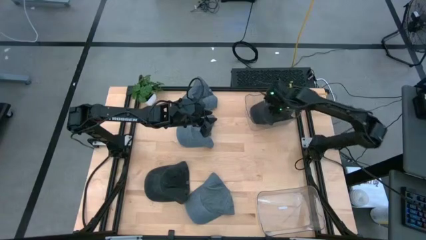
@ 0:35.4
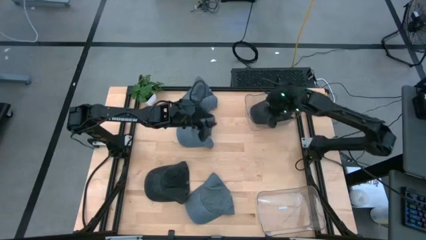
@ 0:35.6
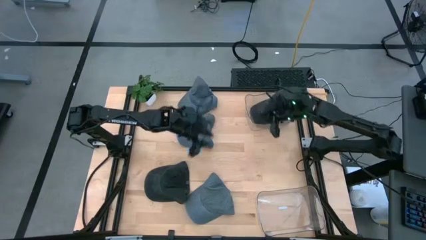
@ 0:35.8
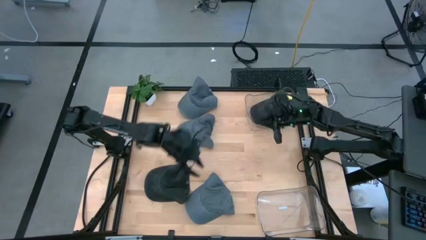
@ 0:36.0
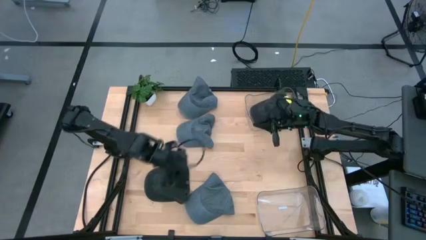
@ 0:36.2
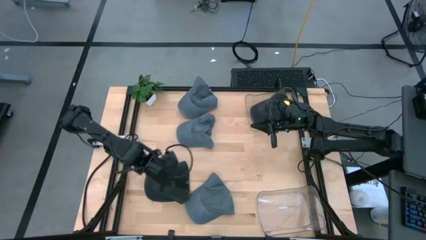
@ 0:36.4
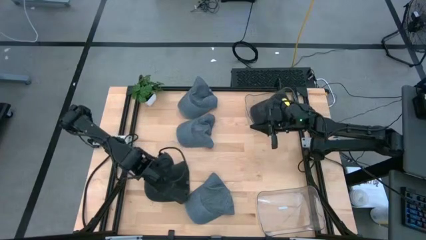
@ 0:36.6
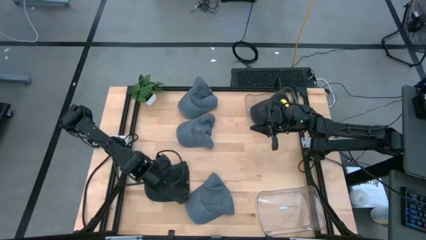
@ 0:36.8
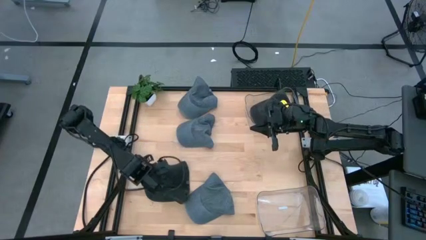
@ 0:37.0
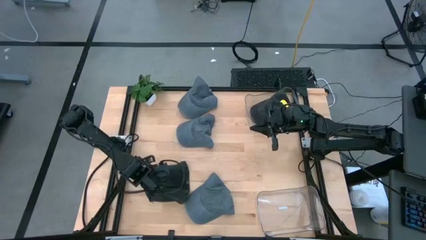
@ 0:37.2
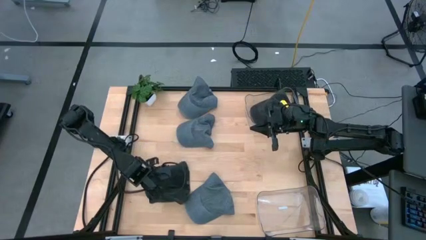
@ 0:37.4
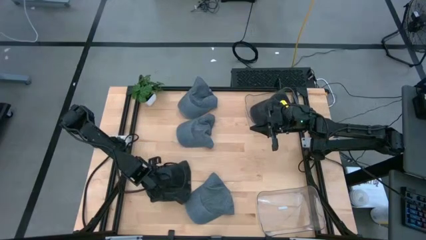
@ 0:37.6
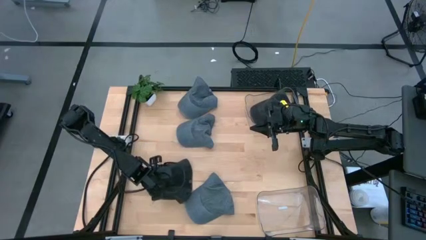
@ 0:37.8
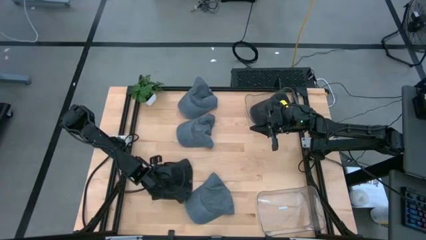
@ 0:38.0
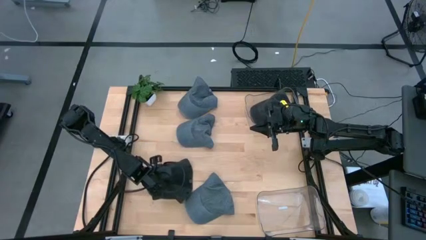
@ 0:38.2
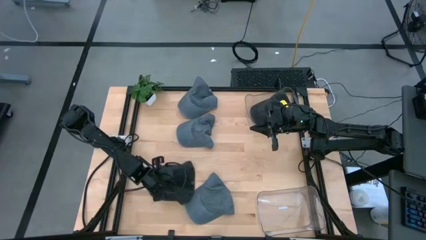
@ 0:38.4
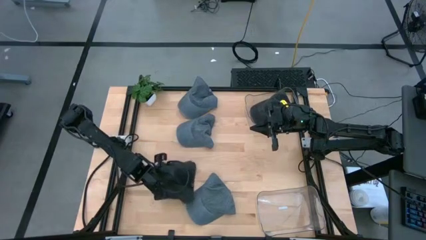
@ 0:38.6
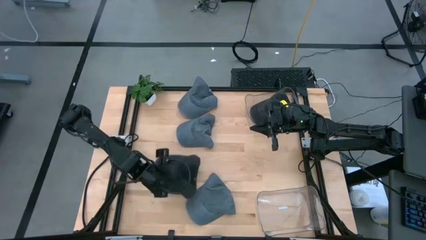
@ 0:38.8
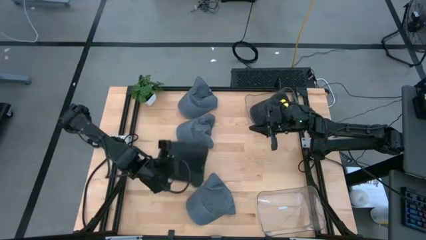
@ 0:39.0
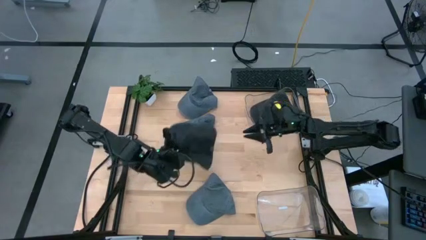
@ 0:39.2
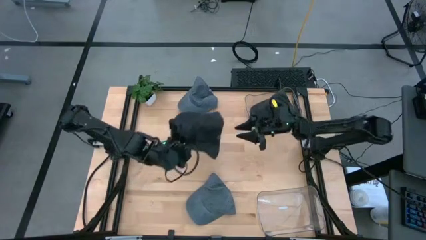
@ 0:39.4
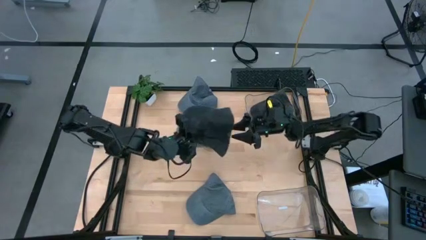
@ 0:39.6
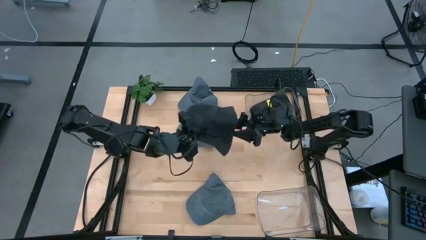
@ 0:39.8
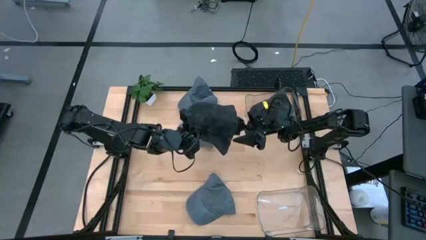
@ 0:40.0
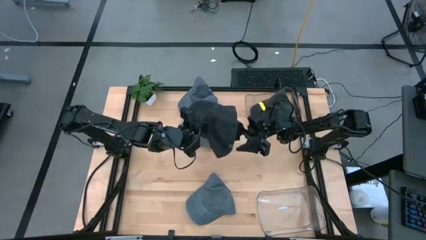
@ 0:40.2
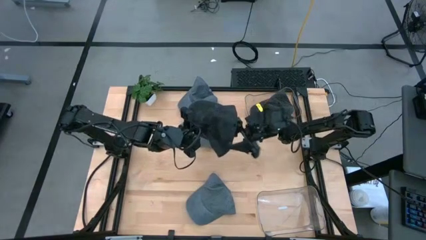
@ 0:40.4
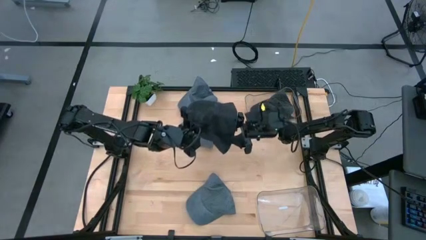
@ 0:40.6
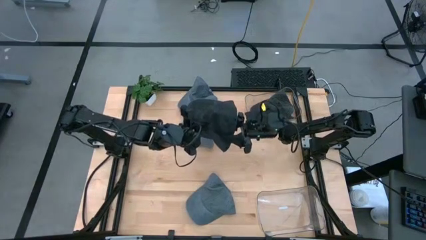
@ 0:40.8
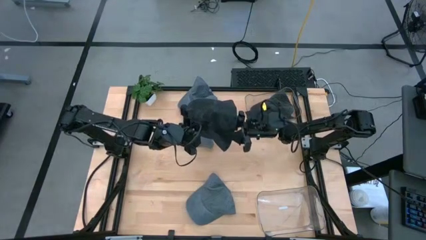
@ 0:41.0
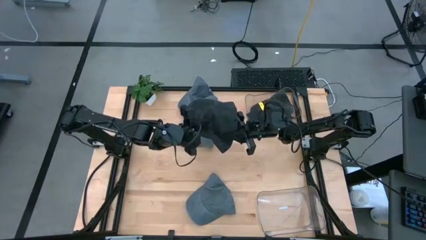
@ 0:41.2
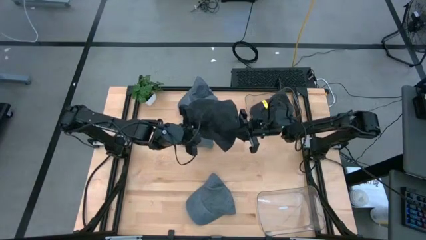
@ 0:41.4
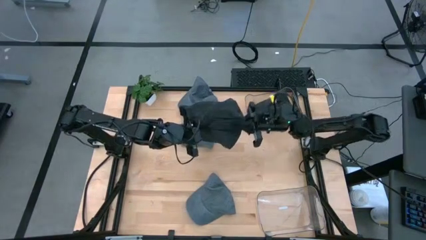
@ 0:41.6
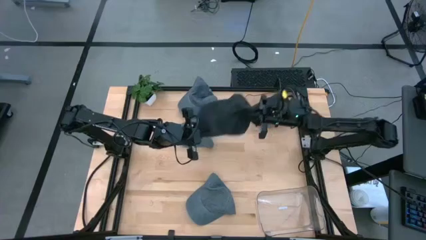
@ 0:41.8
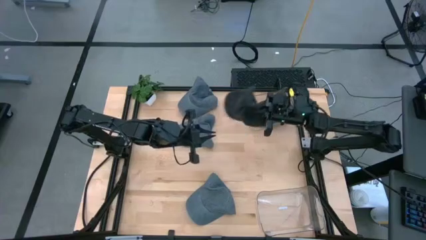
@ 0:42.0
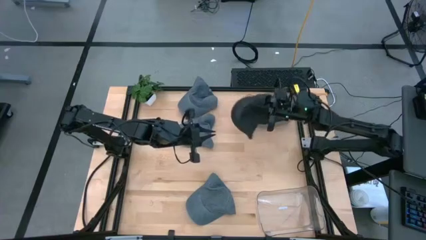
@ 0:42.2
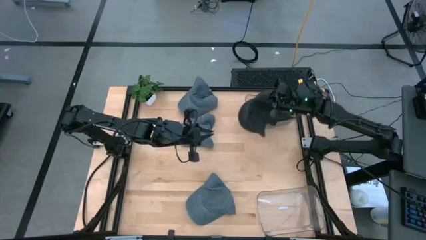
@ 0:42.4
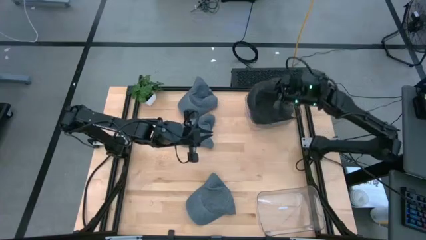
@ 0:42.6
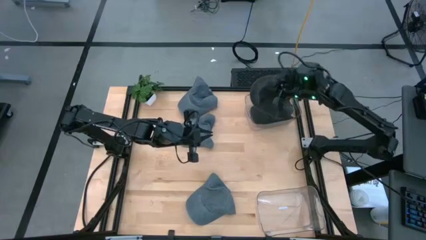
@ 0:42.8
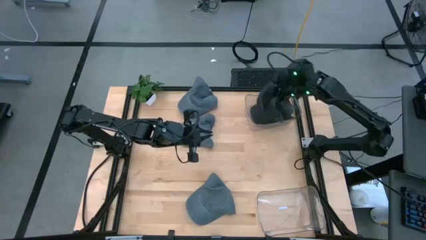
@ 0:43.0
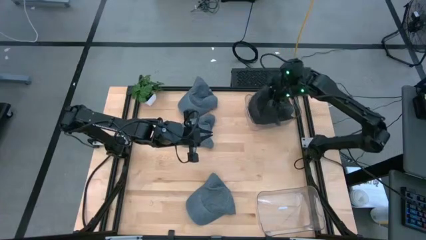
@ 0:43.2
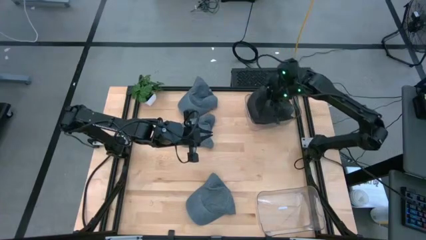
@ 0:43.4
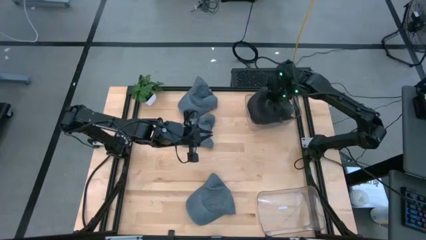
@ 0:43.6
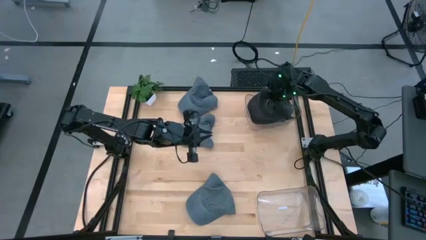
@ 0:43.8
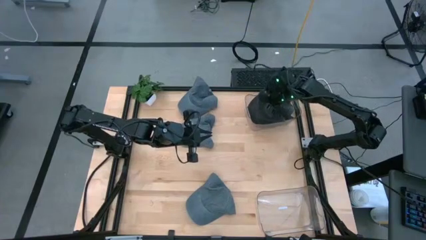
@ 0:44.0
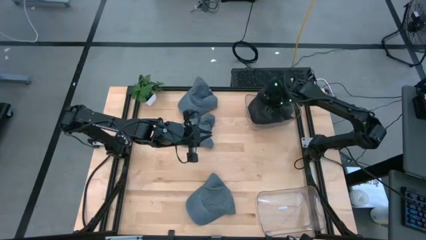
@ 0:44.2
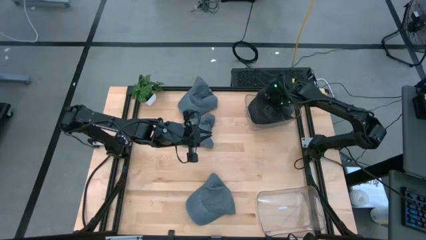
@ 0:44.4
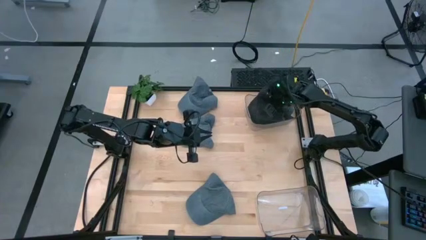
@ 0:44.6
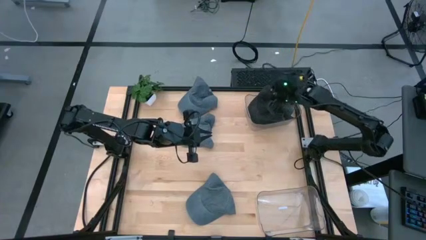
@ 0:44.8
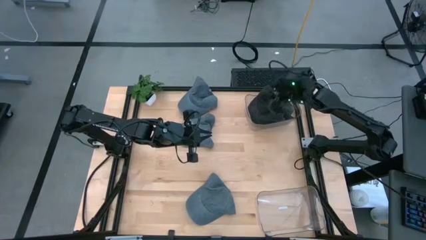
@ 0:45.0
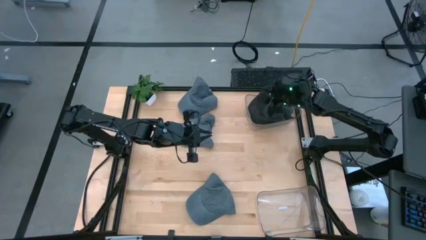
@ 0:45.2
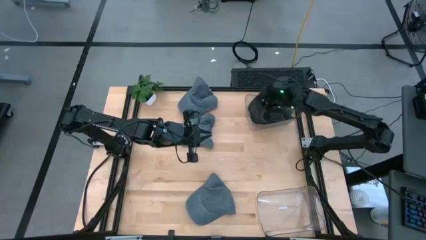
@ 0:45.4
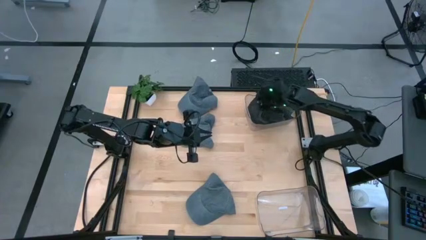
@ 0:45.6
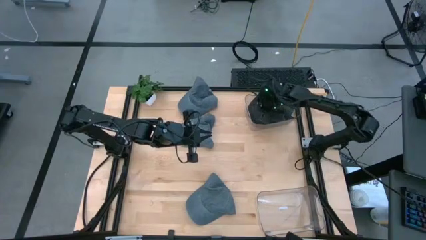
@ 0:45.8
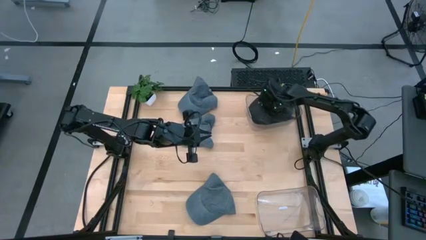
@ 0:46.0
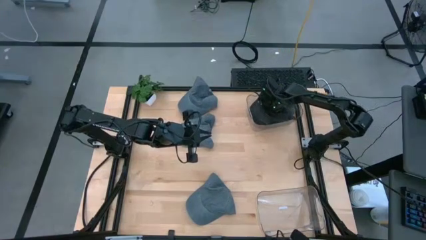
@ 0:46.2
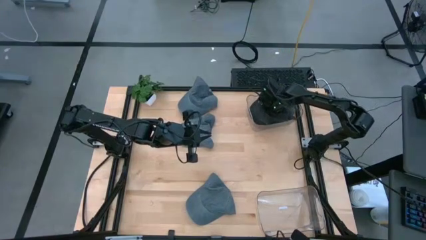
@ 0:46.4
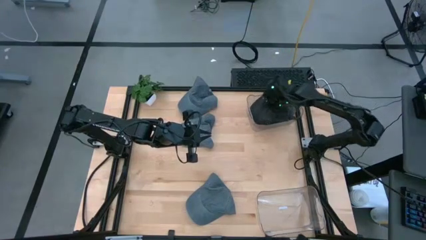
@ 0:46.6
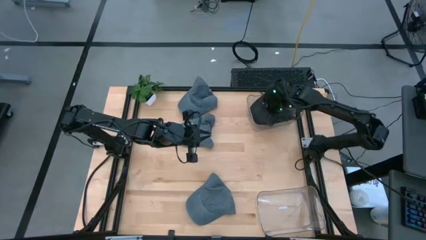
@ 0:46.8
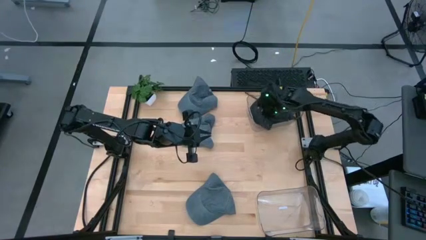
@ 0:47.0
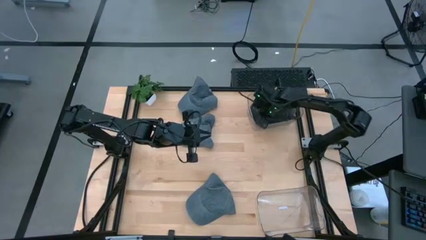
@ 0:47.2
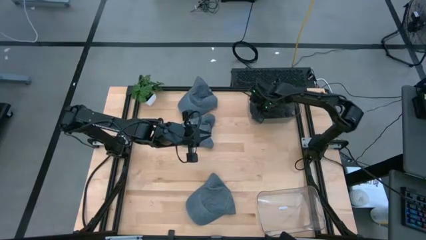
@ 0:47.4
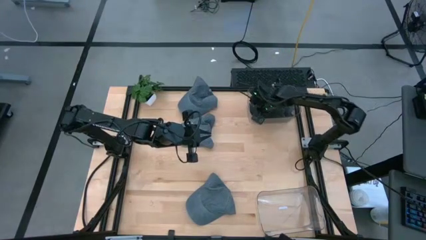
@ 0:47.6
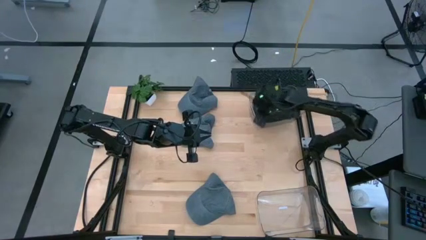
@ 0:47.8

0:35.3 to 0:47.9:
Task: Pick & Place hat
Put the black cap into the top transparent bin
